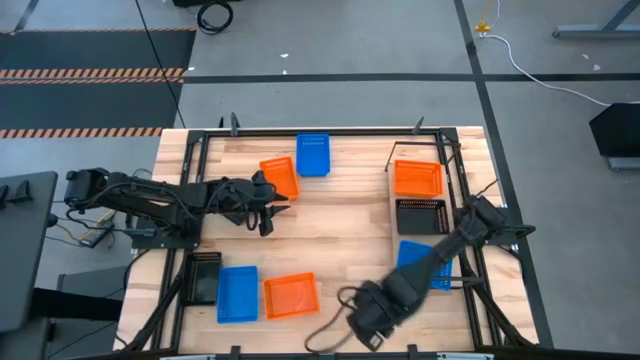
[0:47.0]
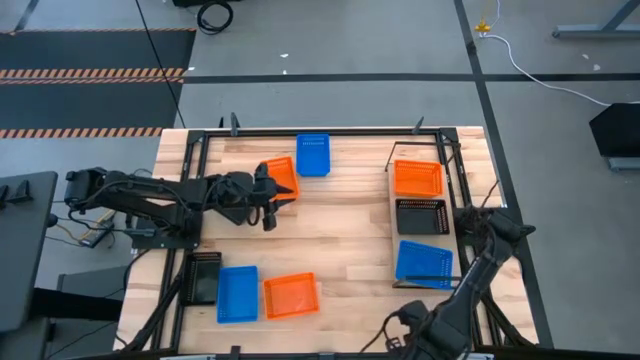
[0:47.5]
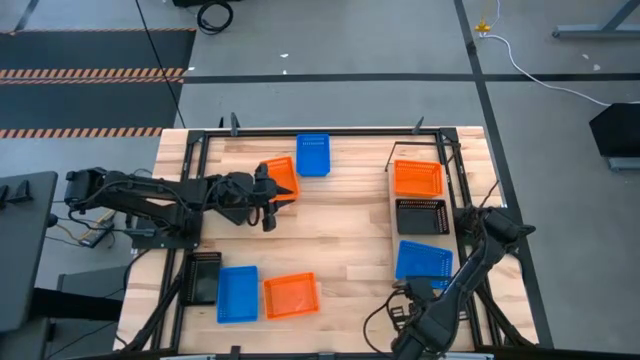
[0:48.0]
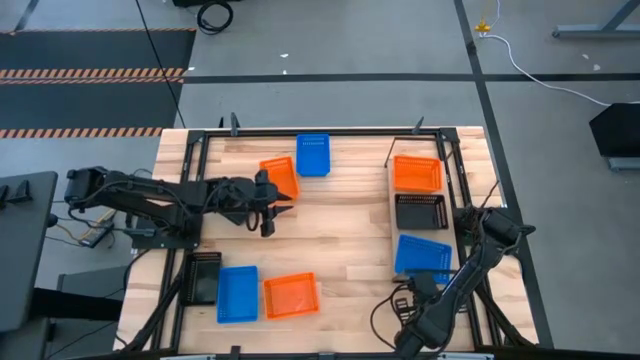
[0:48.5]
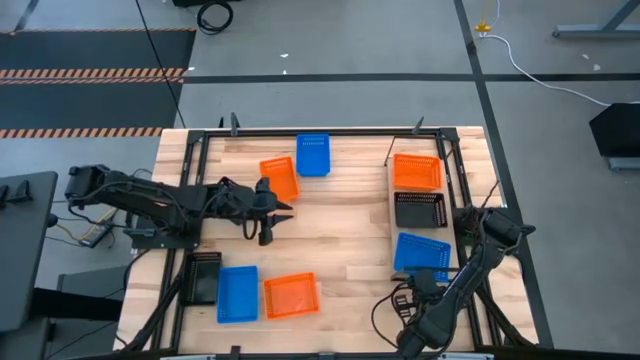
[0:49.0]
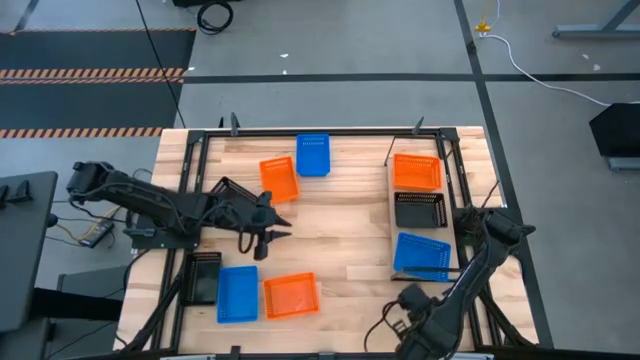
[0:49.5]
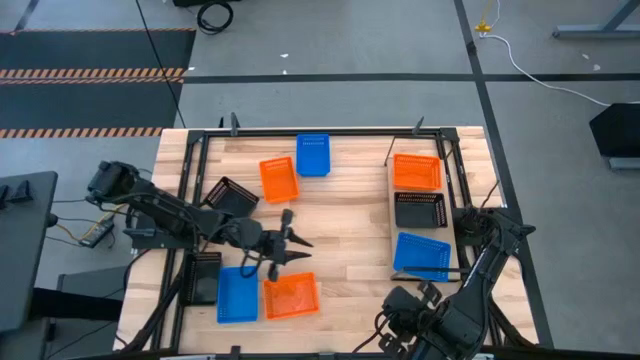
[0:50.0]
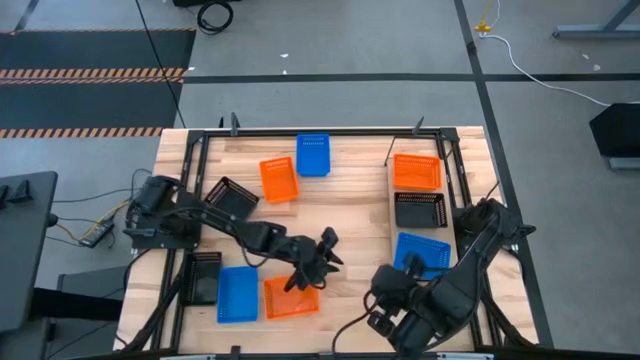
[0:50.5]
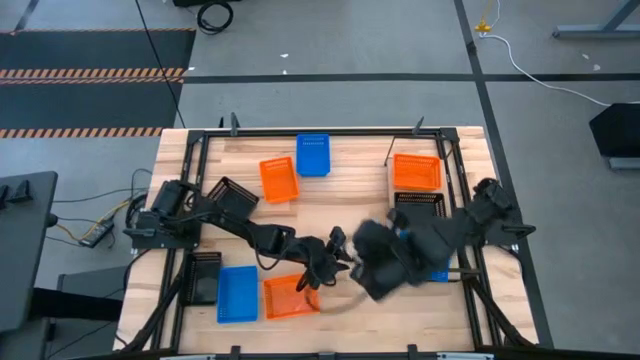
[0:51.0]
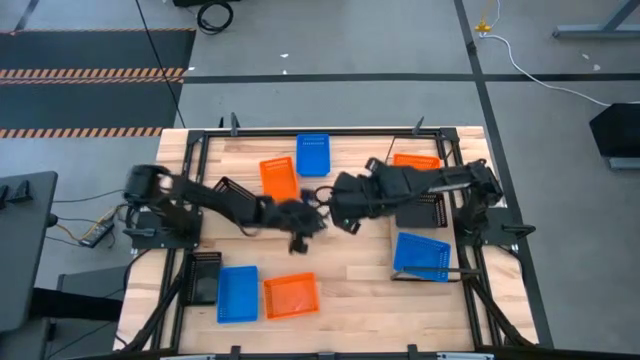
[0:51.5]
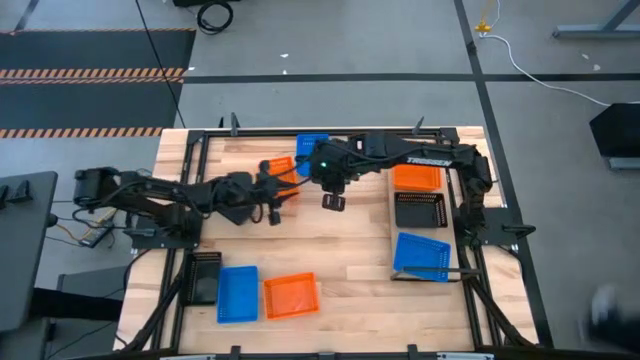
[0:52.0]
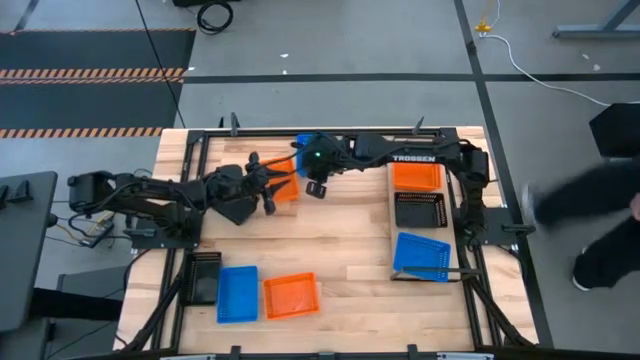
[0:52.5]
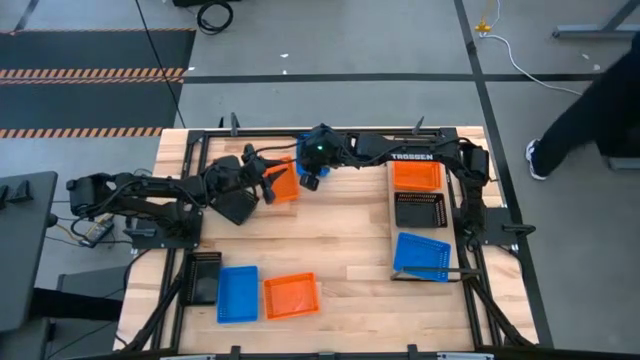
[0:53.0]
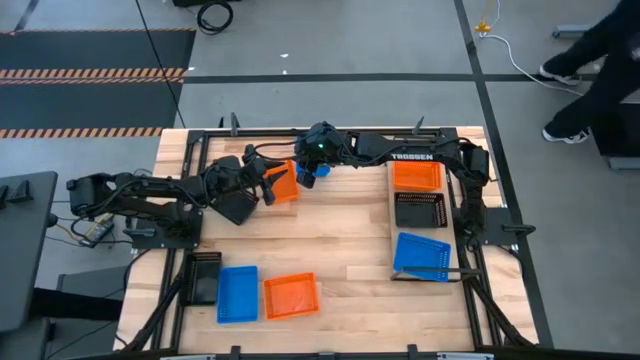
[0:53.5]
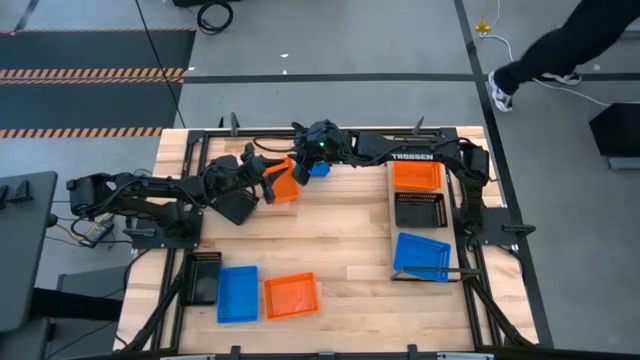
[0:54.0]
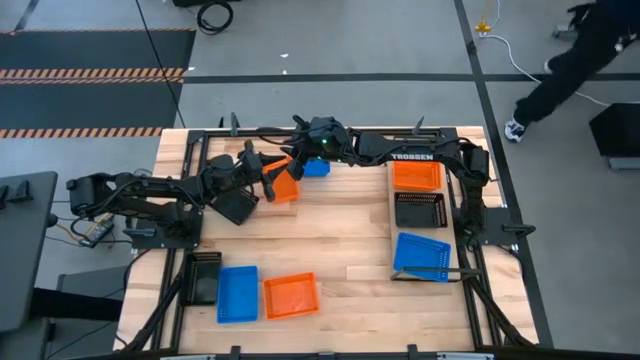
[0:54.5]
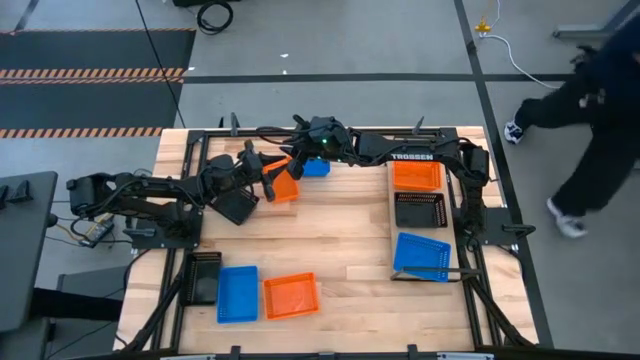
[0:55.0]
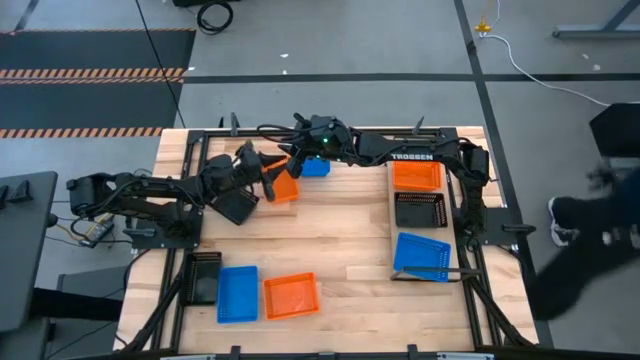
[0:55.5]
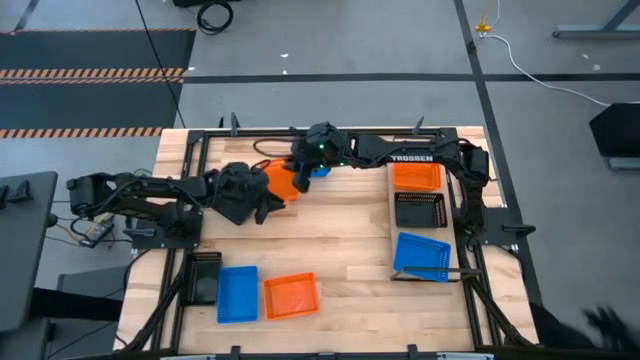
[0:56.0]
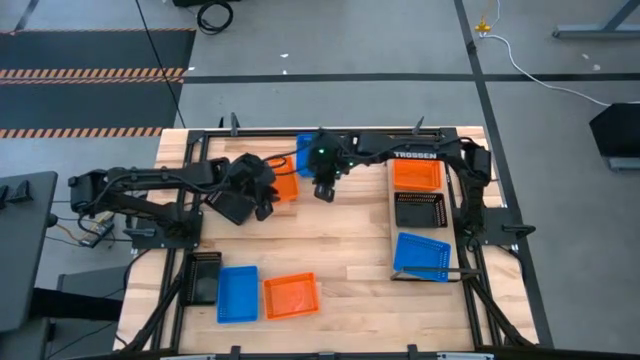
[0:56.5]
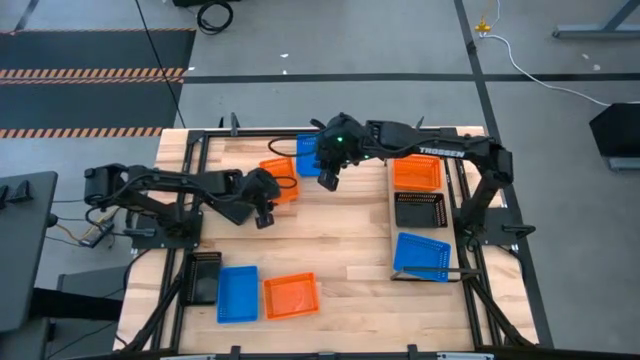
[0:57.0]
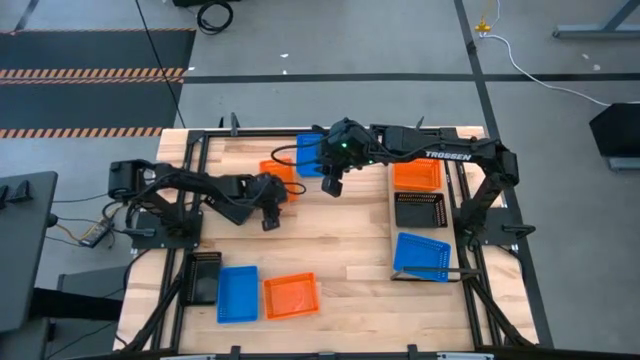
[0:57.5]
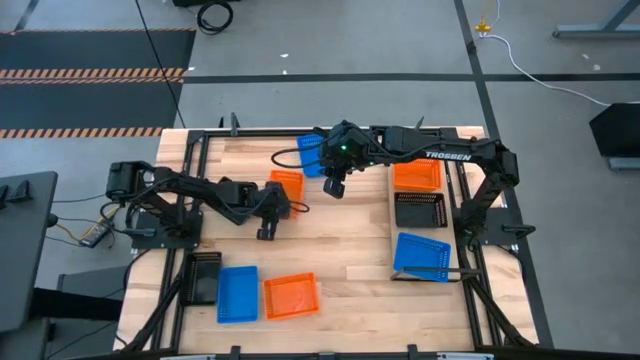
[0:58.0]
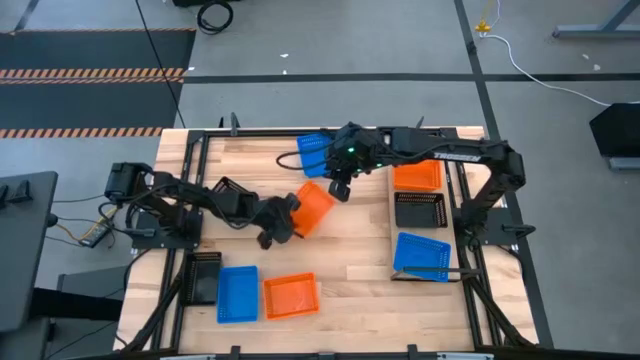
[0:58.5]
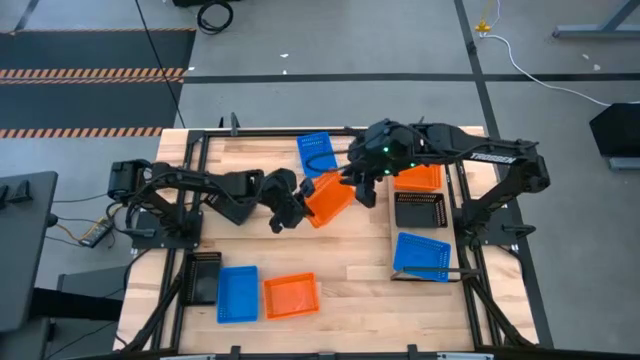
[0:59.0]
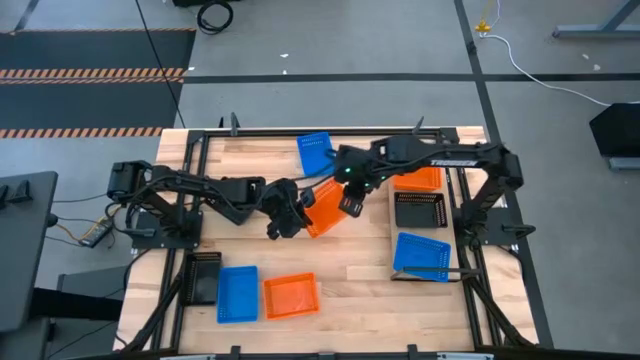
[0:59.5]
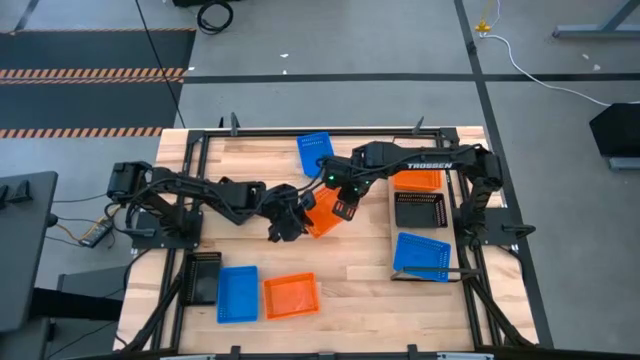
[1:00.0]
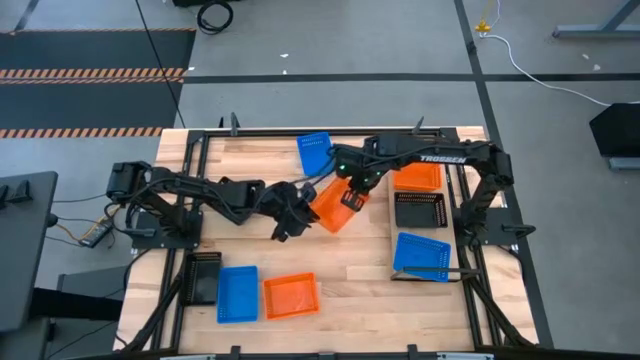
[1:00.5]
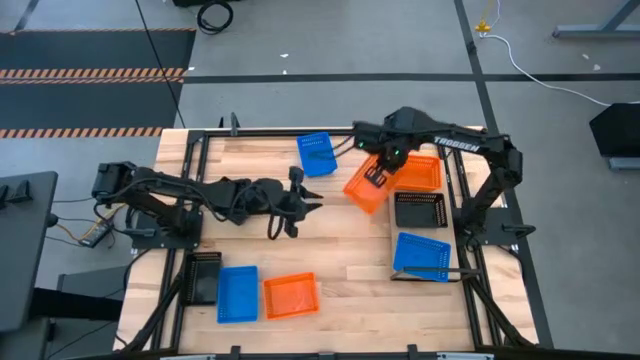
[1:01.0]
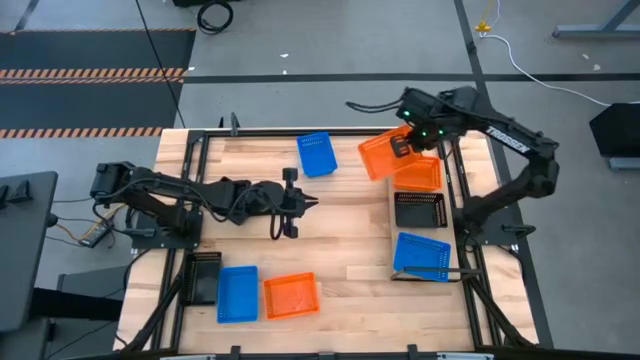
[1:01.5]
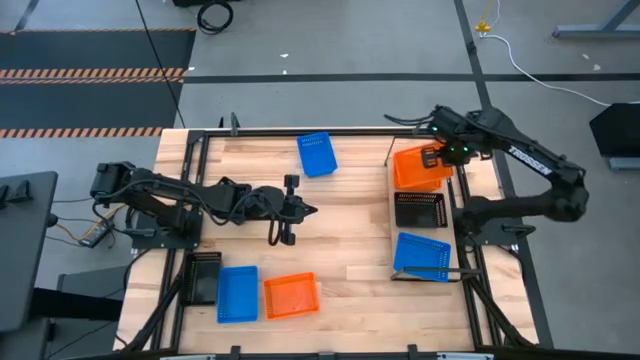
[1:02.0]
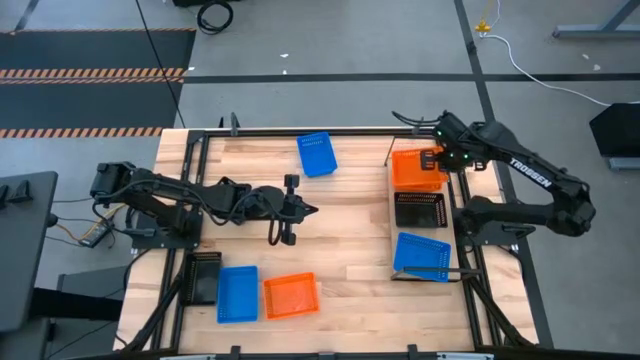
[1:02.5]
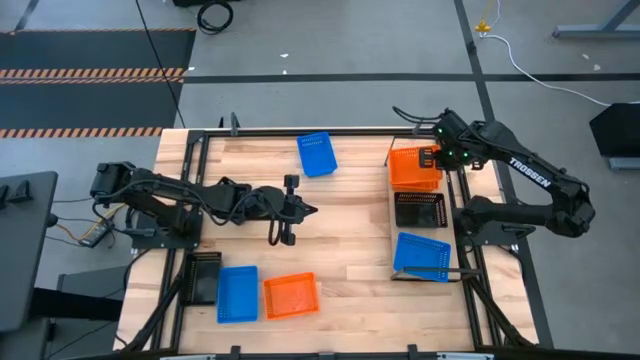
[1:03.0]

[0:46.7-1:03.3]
Task: Stack baskets on shelf by color
Stack the top orange bin on top of the orange bin on the shelf
